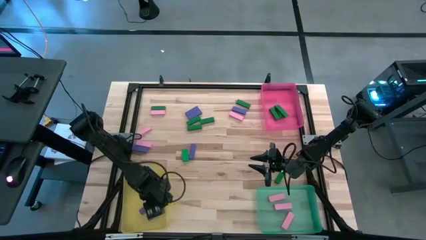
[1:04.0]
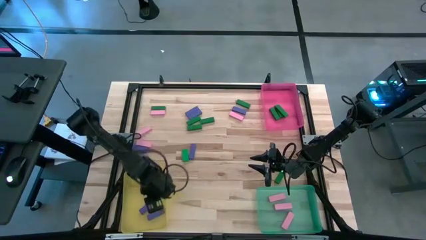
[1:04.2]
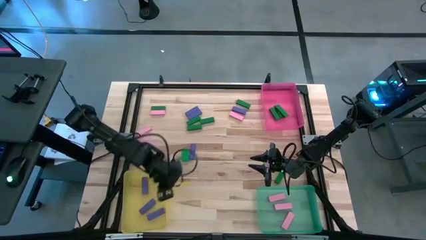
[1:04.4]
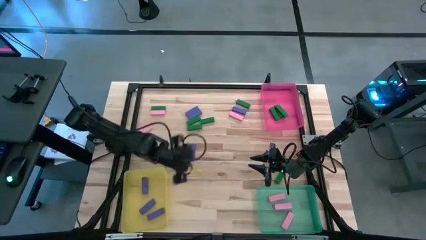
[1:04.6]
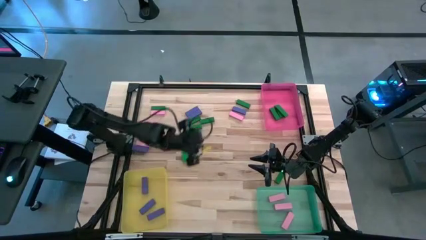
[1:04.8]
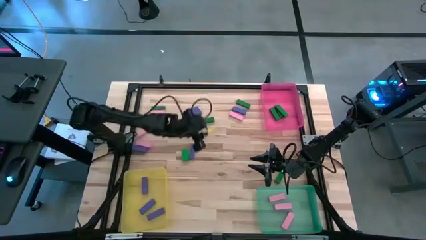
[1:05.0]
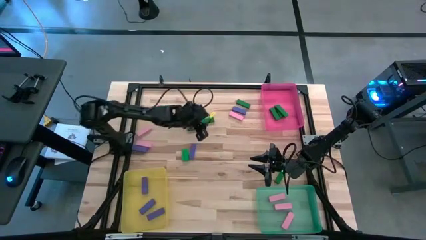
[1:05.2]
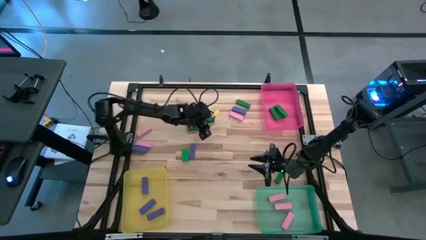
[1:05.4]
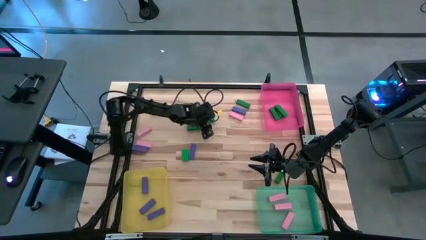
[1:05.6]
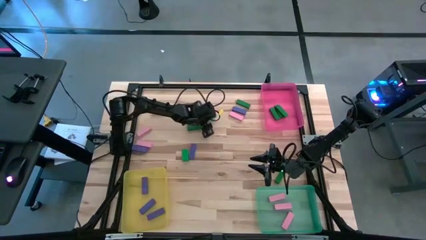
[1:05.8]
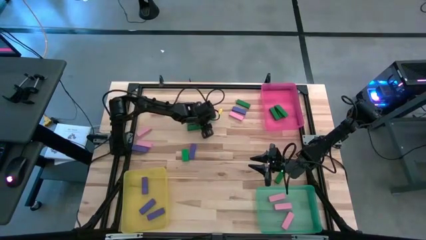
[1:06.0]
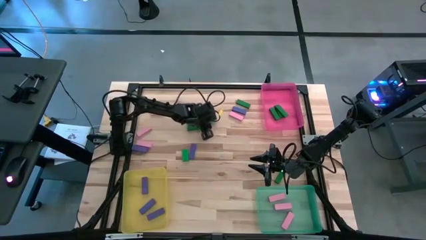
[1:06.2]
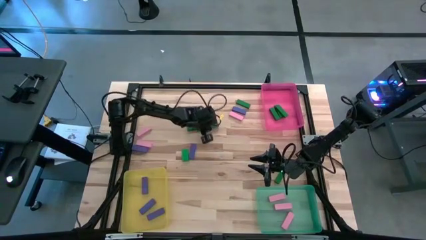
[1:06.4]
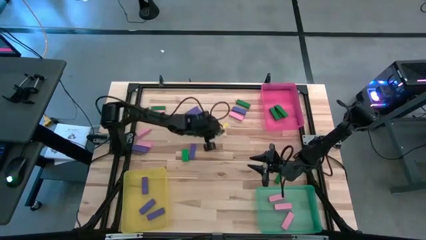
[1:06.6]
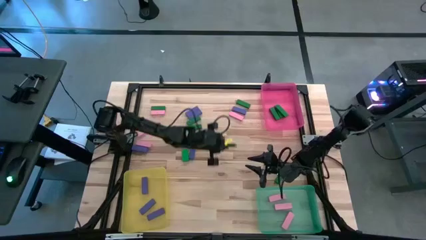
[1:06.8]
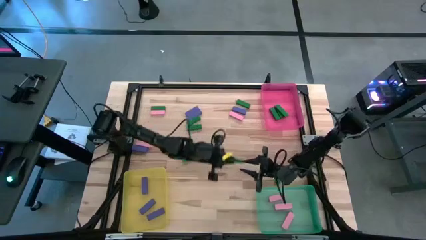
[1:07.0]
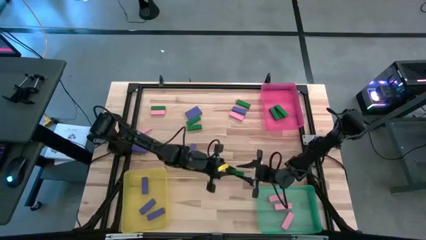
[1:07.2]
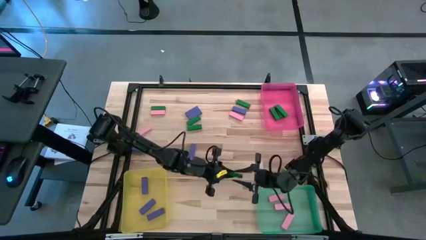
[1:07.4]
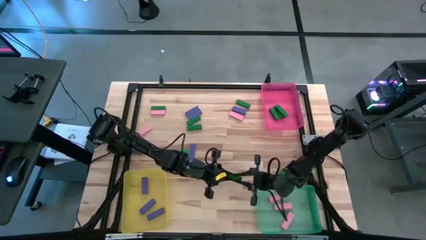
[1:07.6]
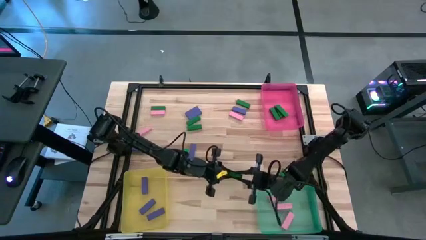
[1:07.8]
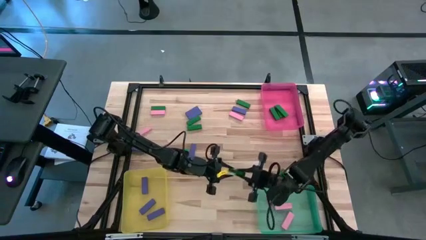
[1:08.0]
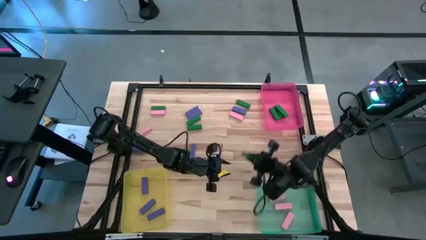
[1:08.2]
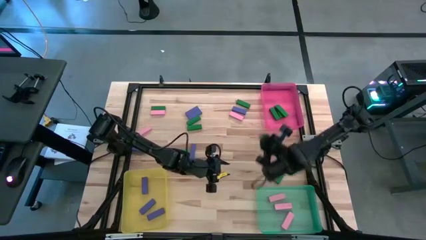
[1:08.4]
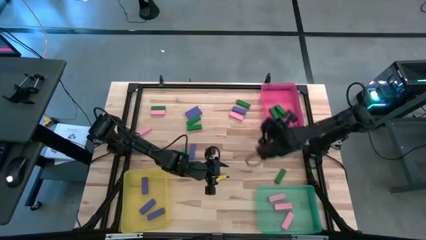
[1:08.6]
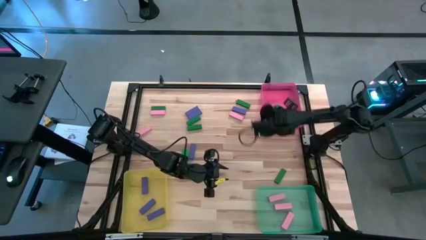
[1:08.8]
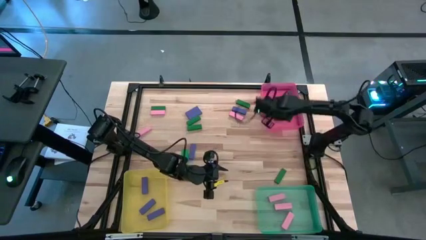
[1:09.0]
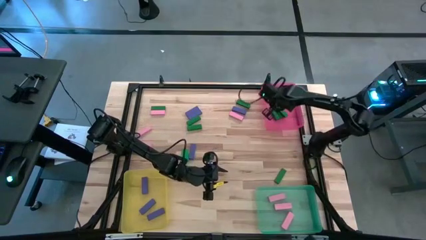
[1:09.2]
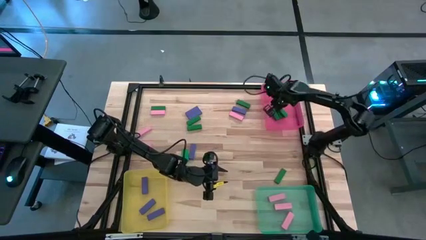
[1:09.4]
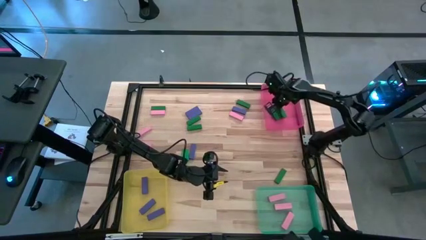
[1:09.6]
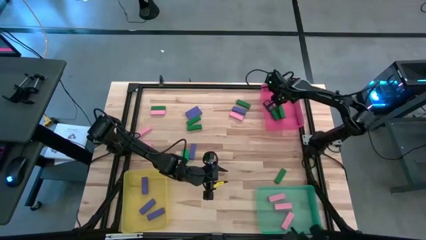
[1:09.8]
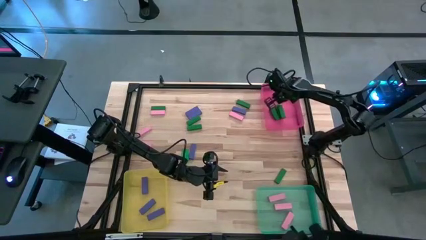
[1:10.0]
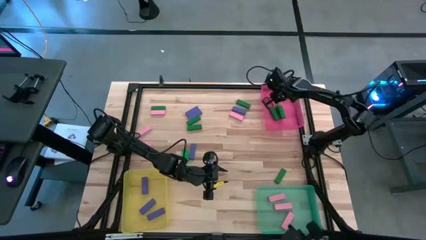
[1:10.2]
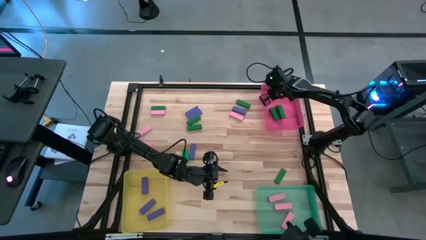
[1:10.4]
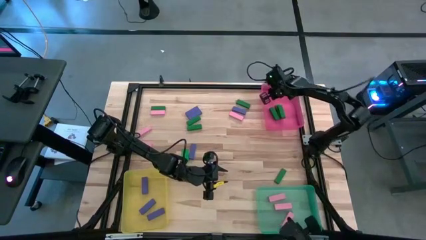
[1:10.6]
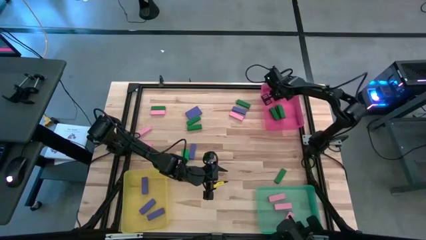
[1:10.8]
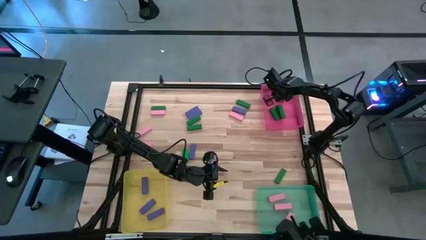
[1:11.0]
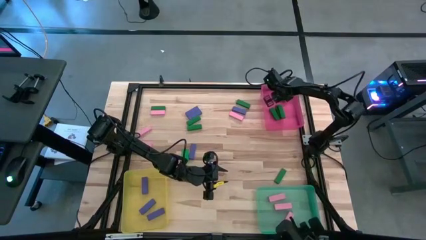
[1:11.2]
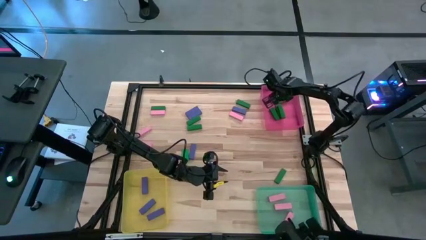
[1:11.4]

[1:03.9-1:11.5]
Task: Sort blocks
Put the green block into the pink bin

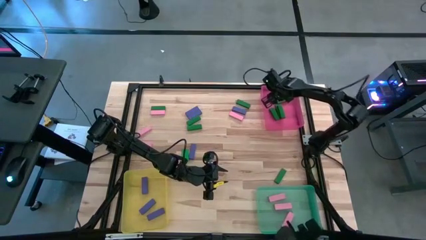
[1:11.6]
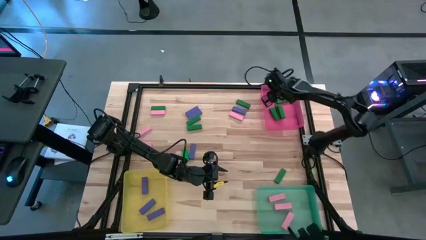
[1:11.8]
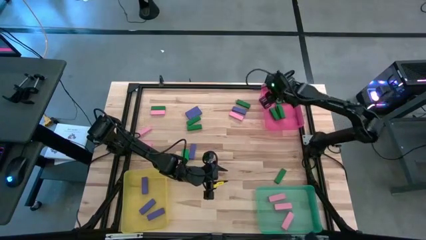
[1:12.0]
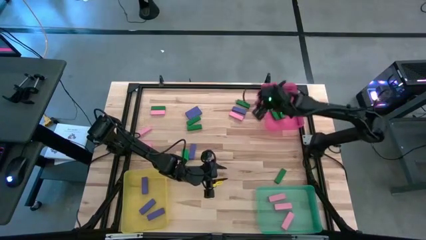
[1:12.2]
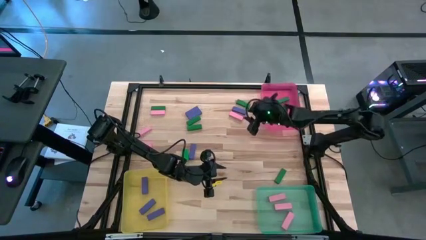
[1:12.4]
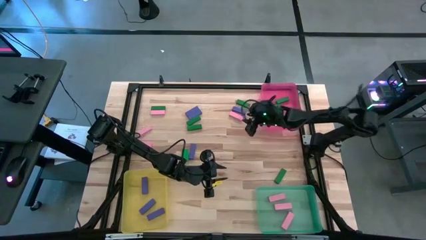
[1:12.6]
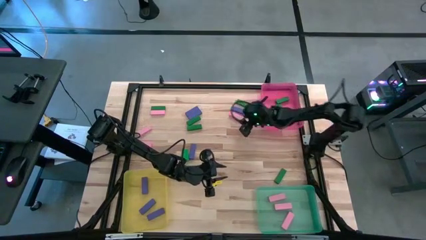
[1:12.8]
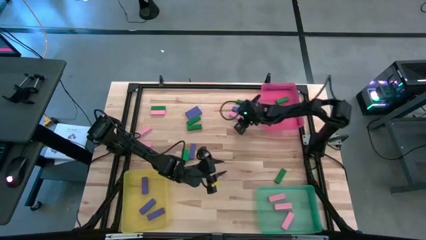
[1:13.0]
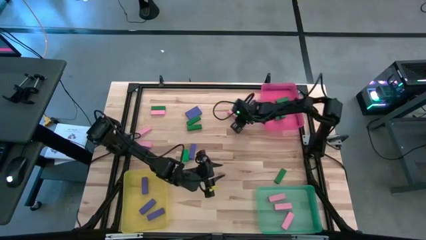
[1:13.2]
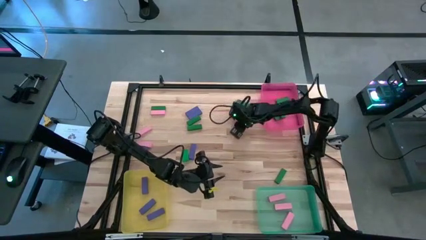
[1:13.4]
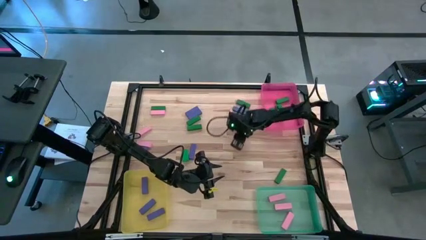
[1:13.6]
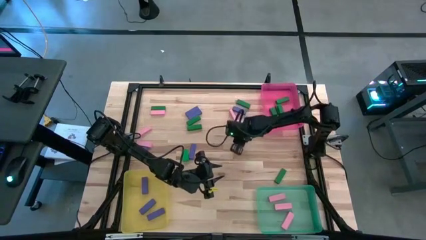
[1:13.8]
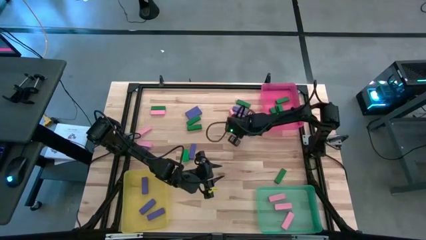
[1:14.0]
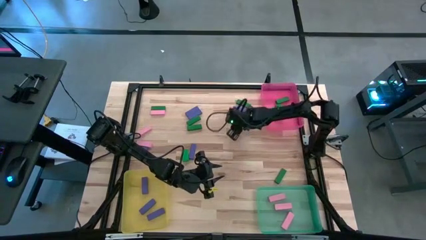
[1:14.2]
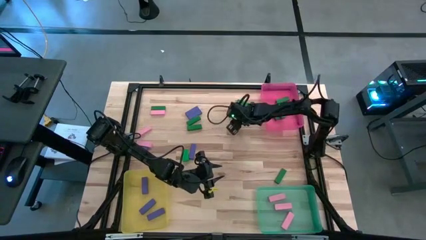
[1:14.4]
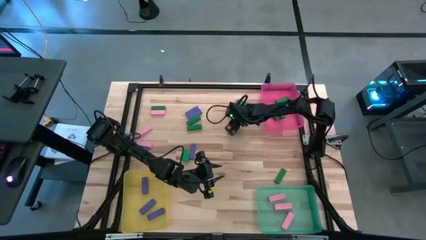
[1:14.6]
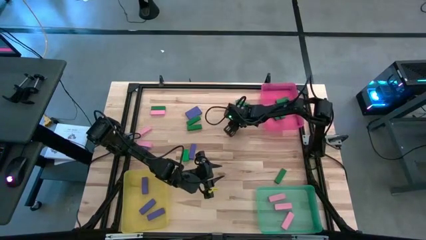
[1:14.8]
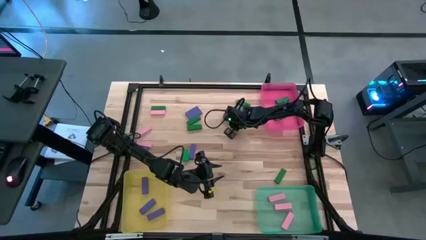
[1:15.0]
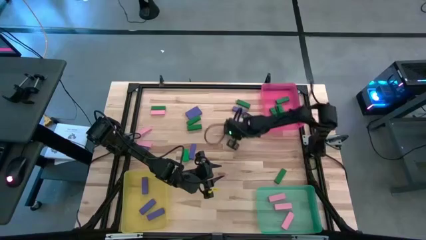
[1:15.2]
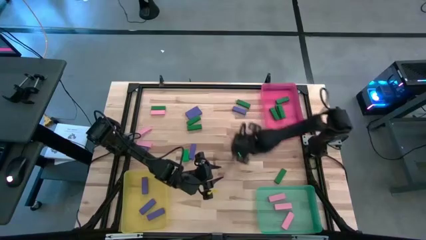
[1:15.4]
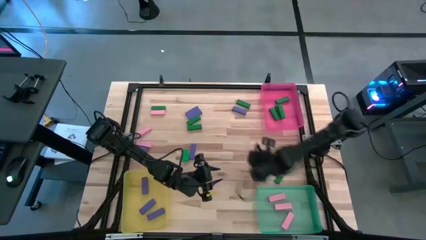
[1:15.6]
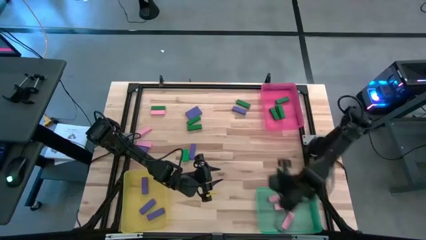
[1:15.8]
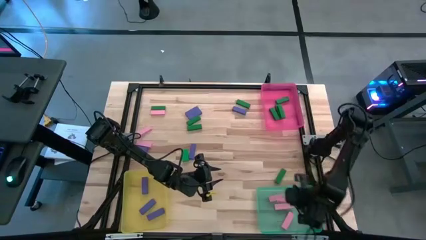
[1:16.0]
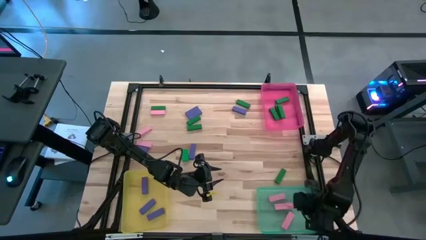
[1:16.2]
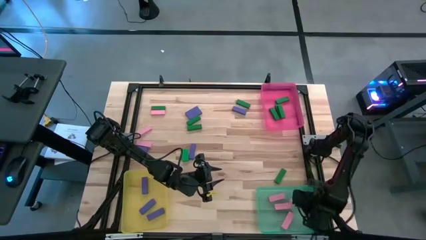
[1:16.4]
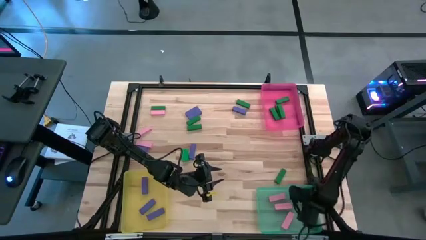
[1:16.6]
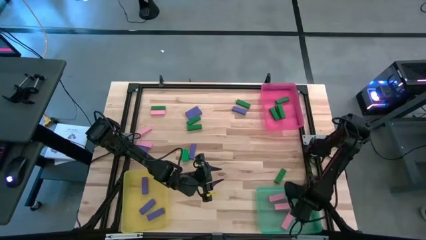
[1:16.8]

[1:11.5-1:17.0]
Put the pink block into the green bin

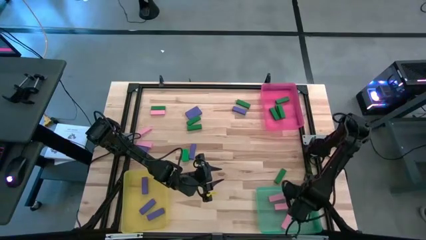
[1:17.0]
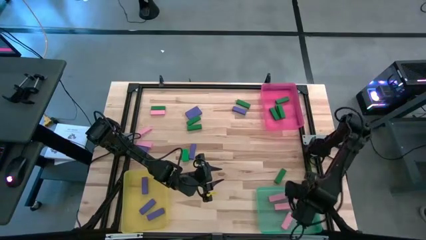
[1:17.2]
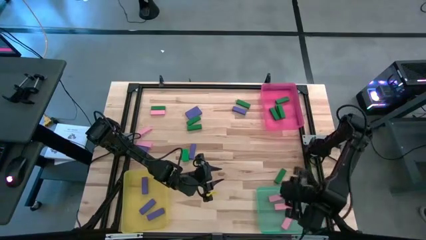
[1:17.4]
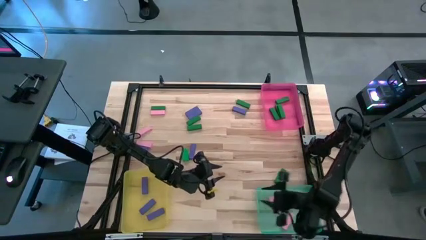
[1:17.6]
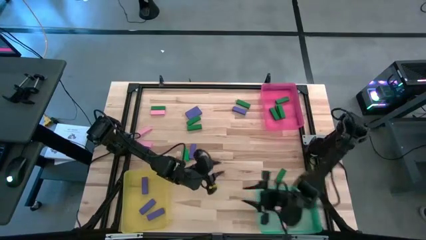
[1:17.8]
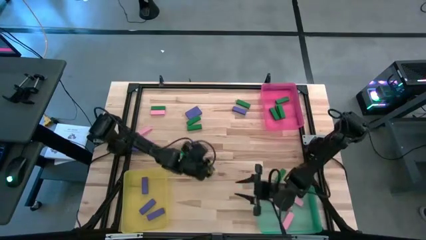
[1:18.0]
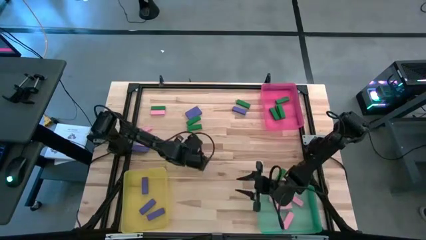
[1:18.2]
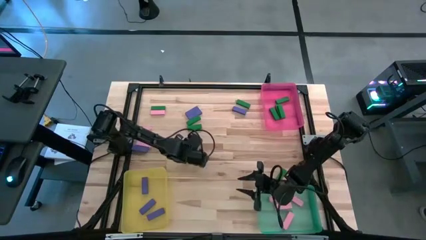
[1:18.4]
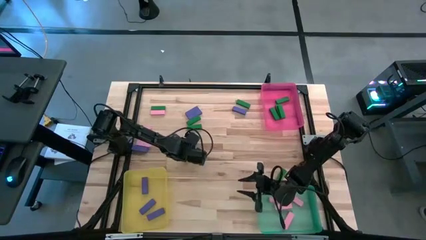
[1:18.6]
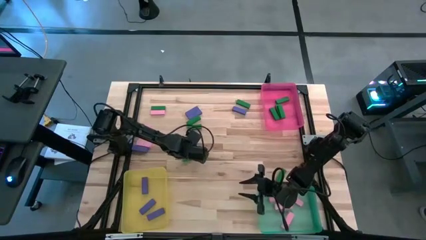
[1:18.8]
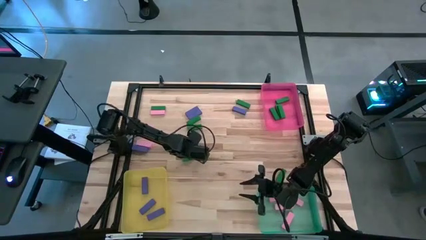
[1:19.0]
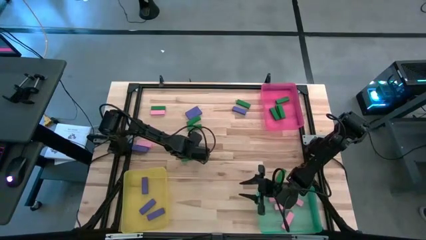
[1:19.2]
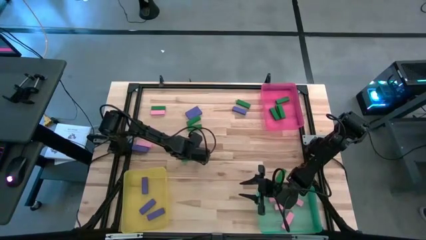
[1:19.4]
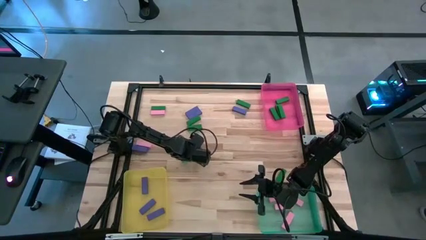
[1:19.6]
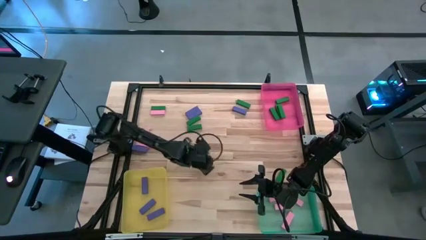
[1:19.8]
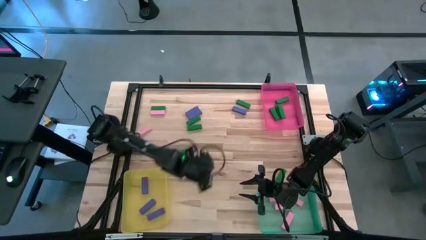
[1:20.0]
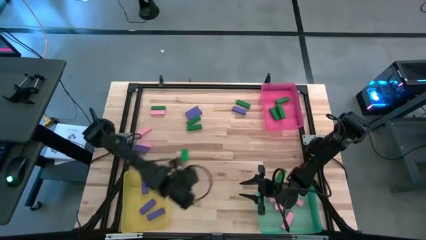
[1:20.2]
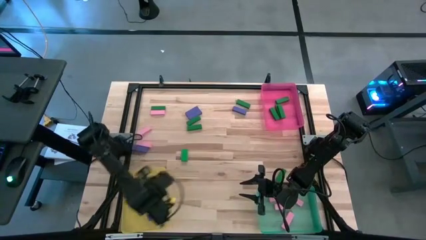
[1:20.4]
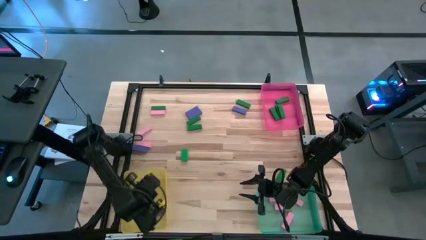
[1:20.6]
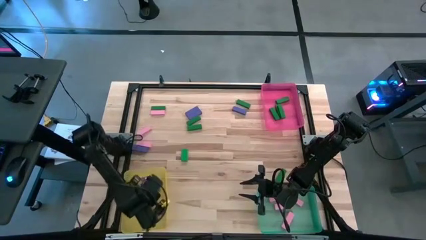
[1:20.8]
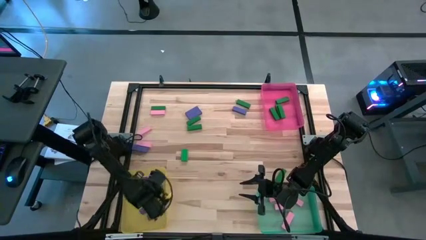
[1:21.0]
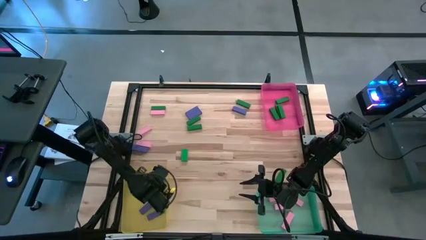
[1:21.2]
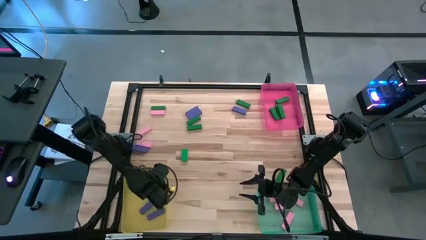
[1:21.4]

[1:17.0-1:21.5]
Put the blue block into the yellow bin
